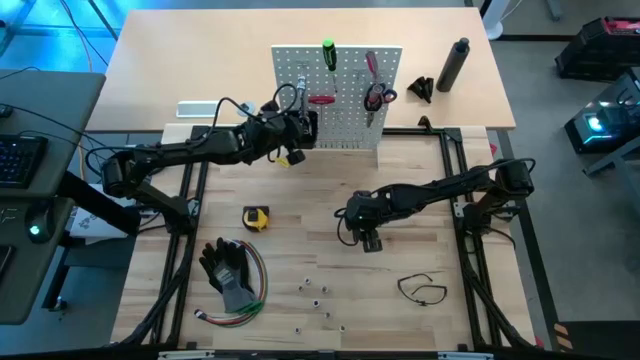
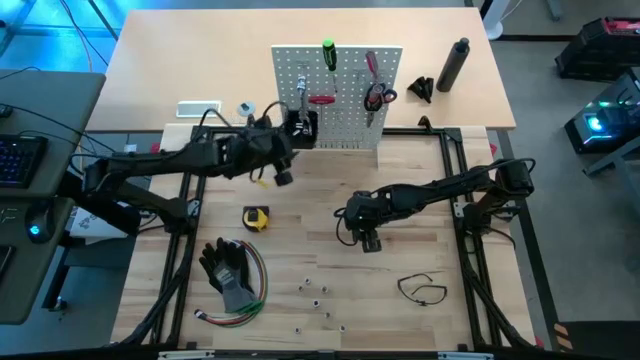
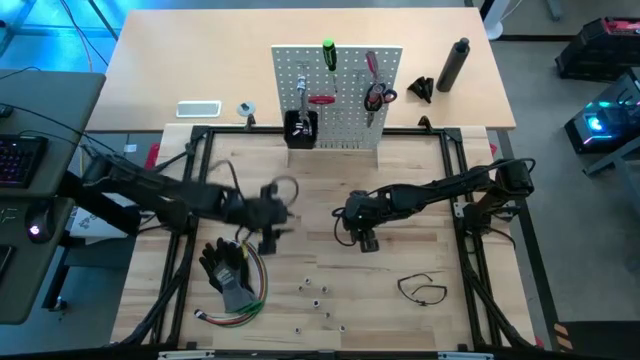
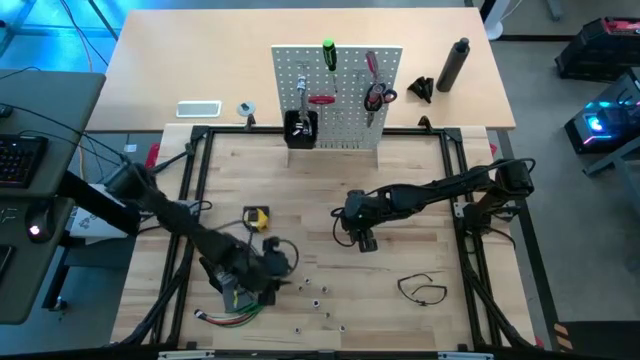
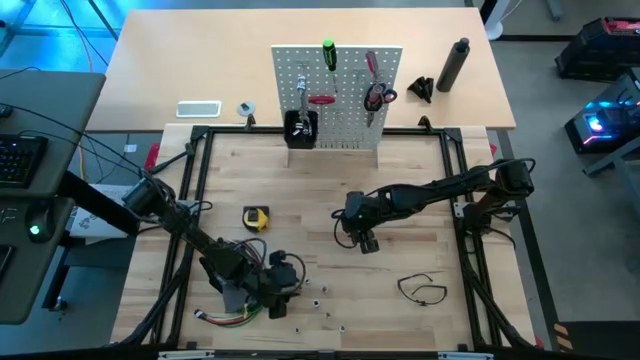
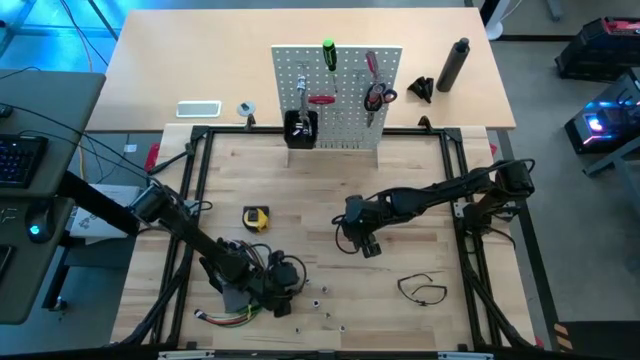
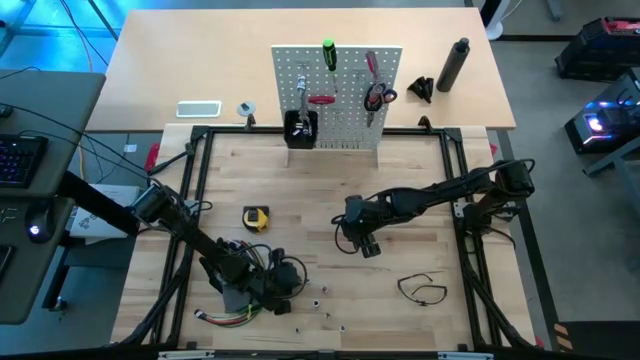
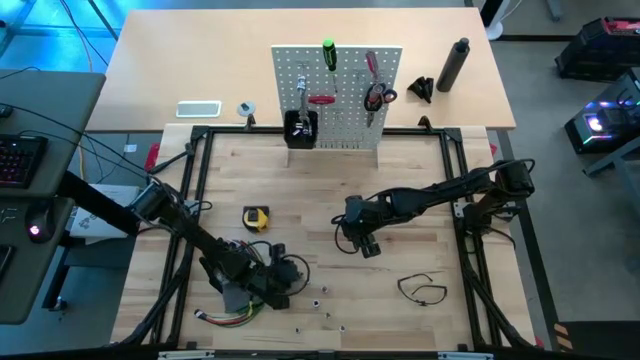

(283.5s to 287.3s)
Task: Hang tools onto peg board
Put the silver socket into the black bin on the white peg board

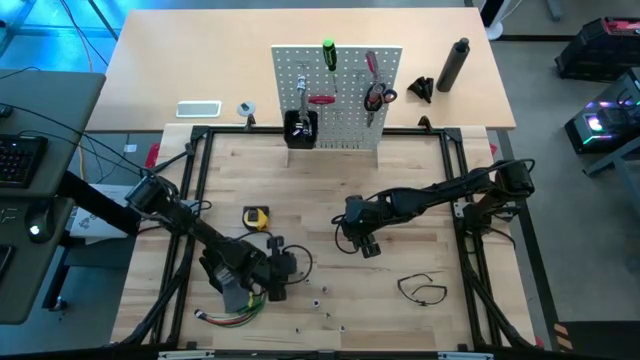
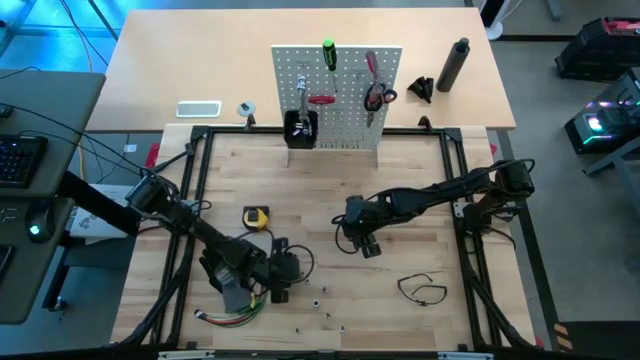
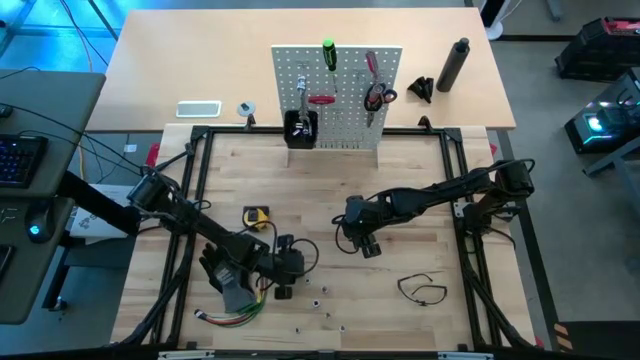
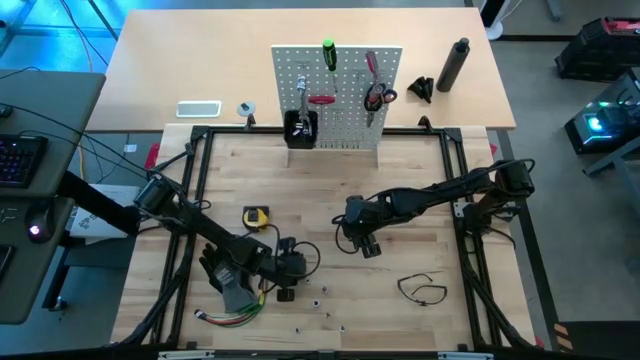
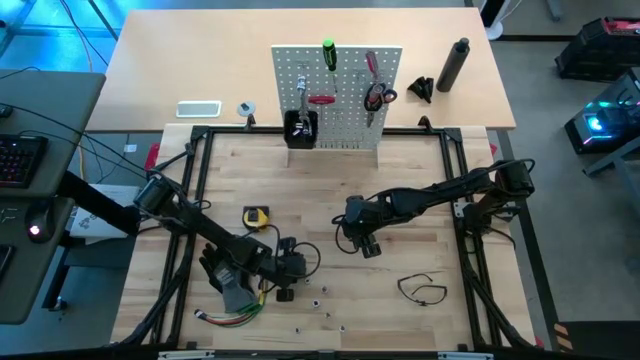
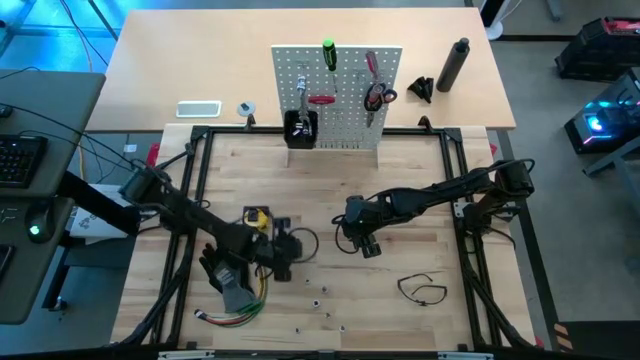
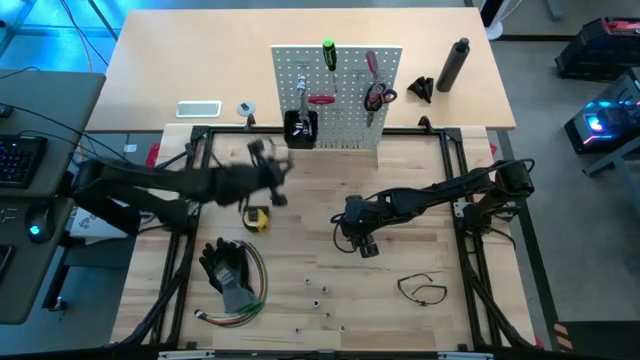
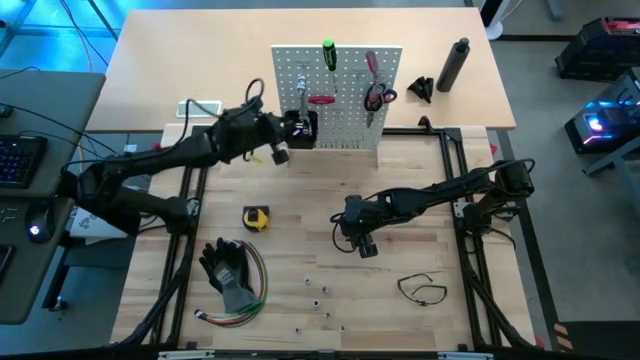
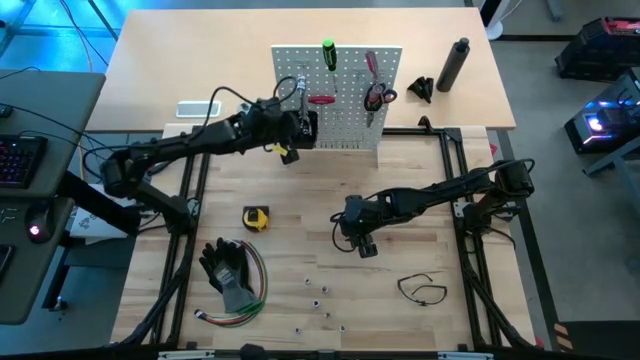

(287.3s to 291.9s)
Put the silver socket into the black bin on the white peg board

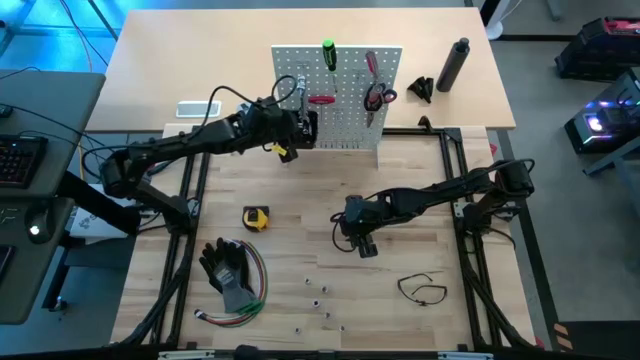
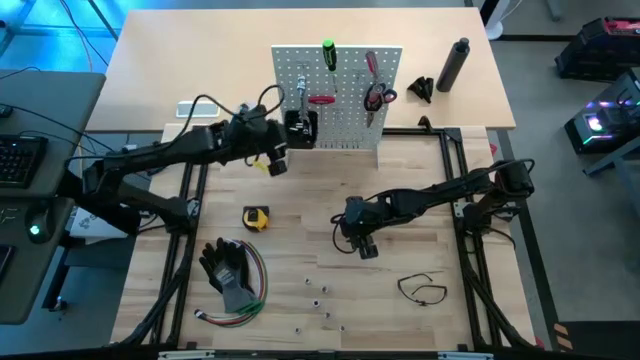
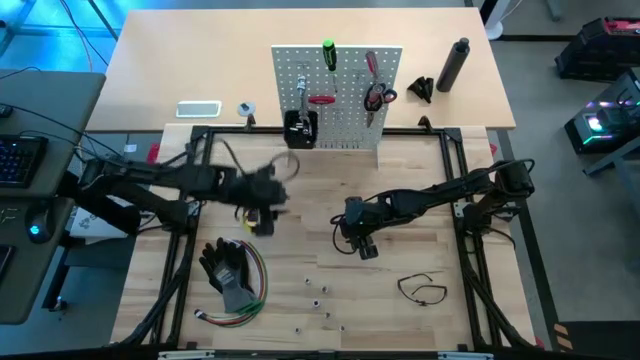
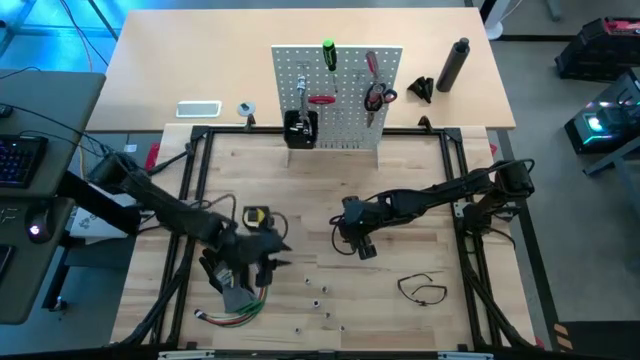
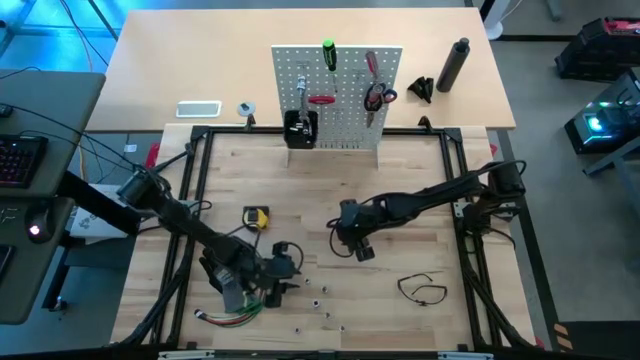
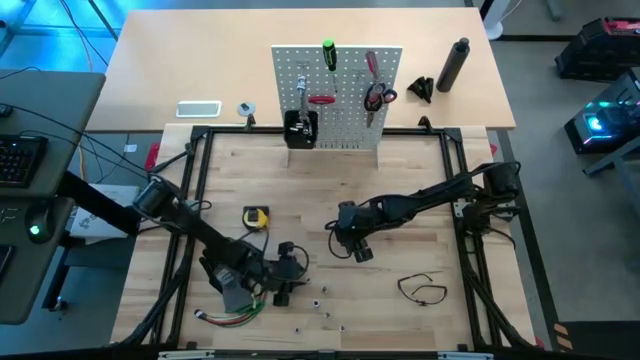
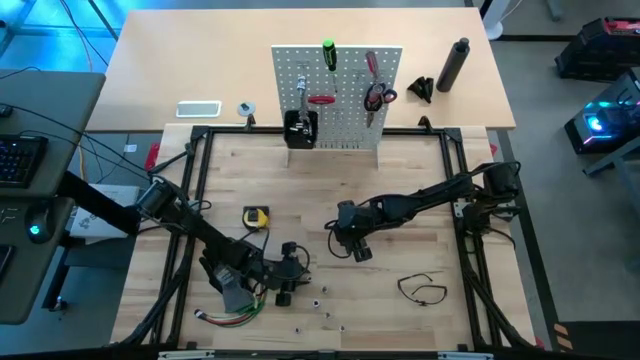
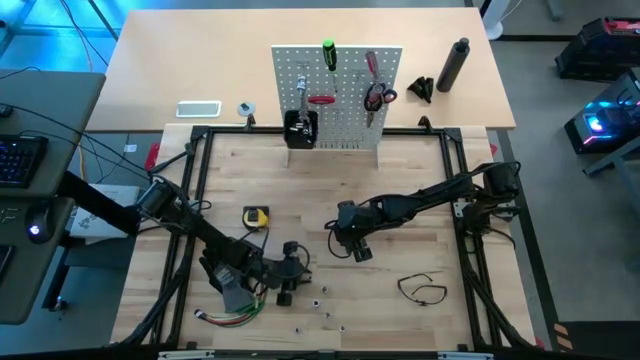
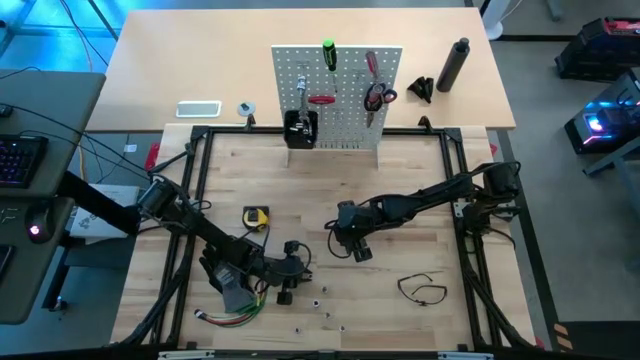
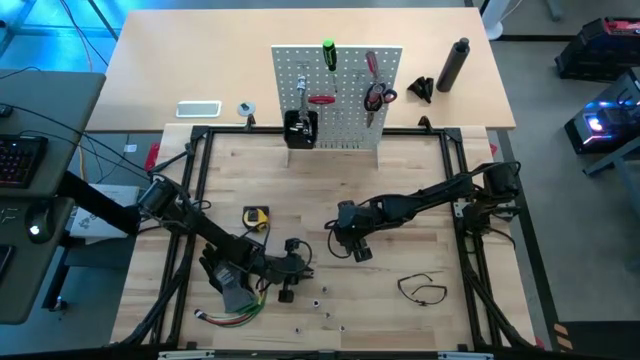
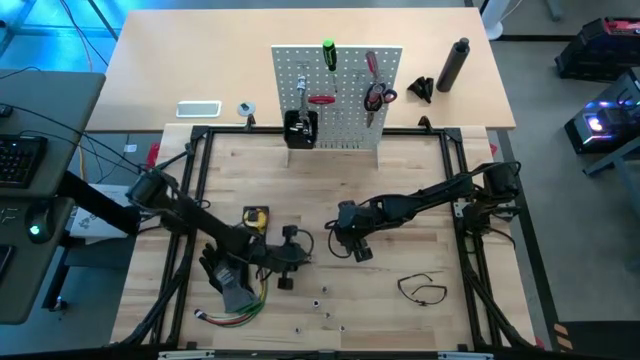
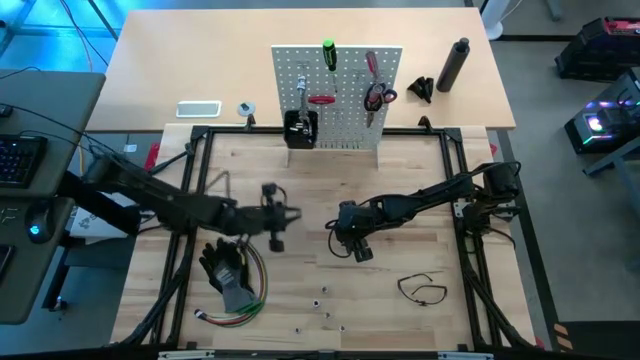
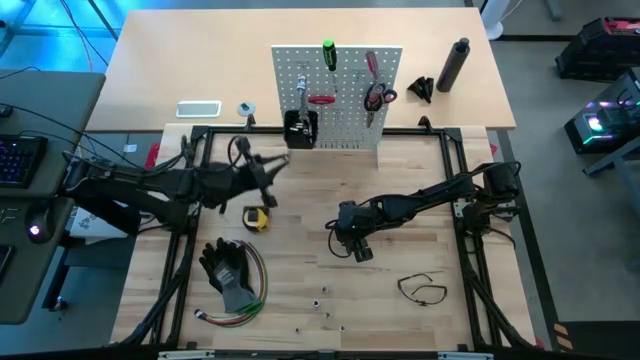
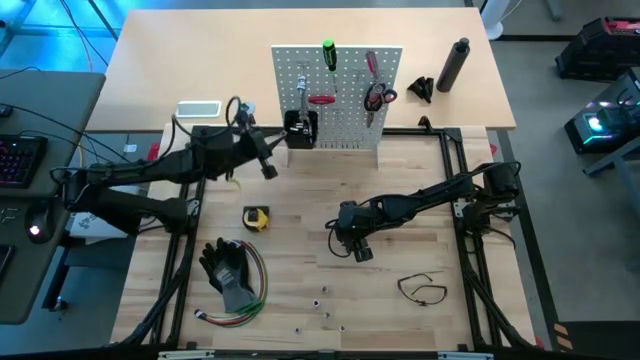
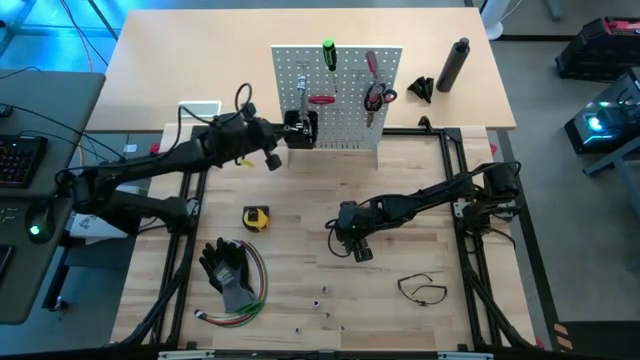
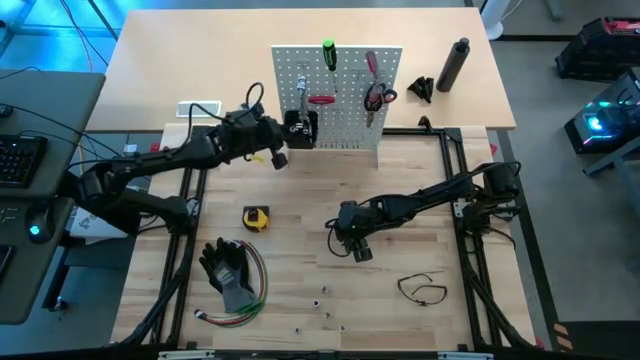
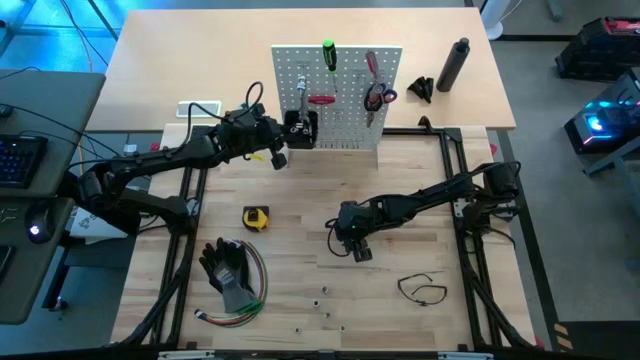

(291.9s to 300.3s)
Put the silver socket into the black bin on the white peg board

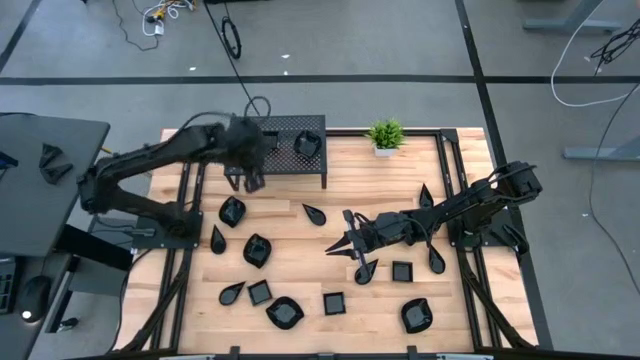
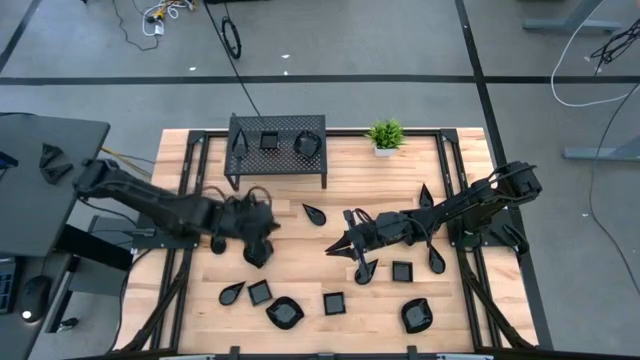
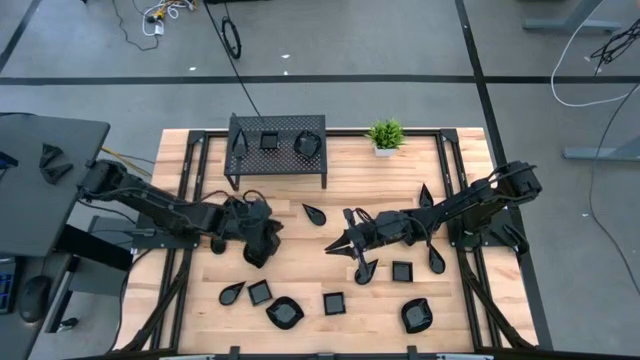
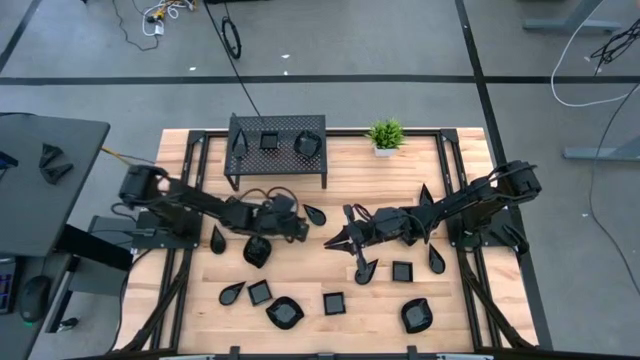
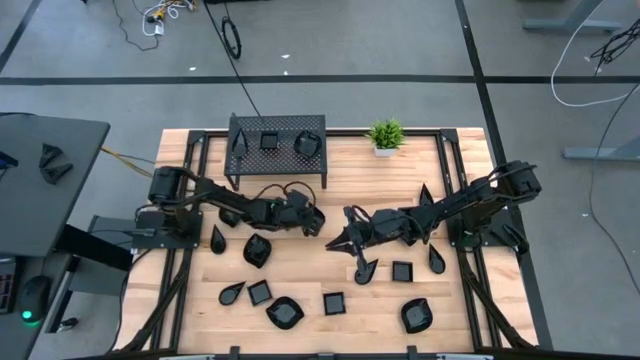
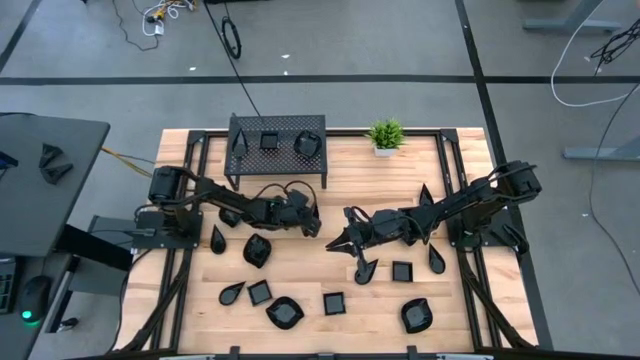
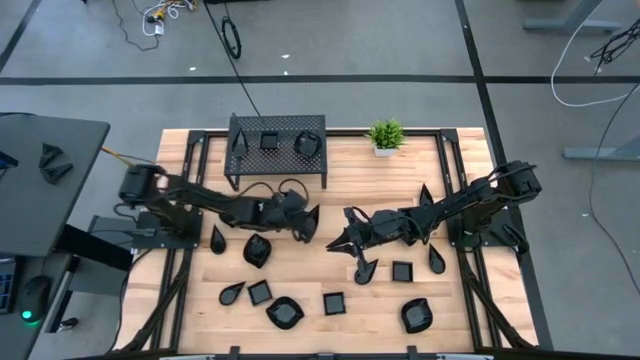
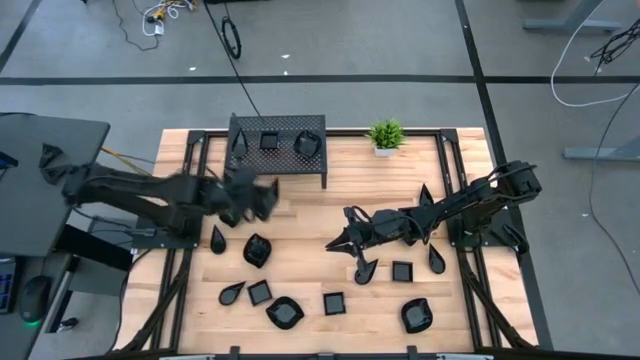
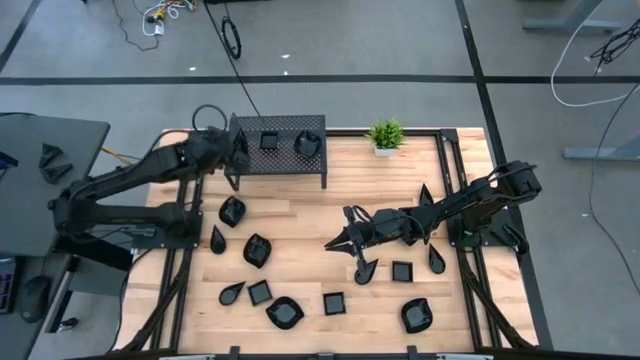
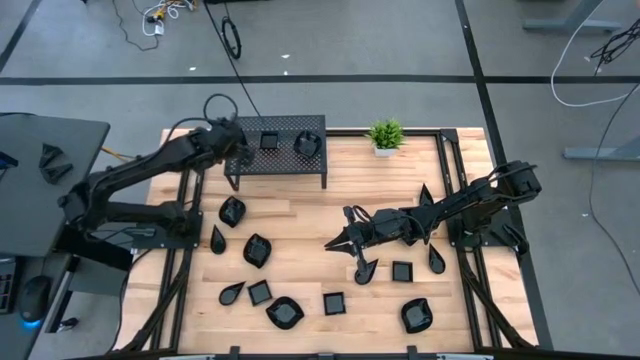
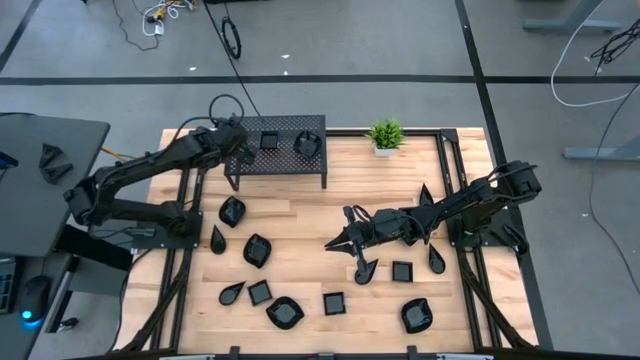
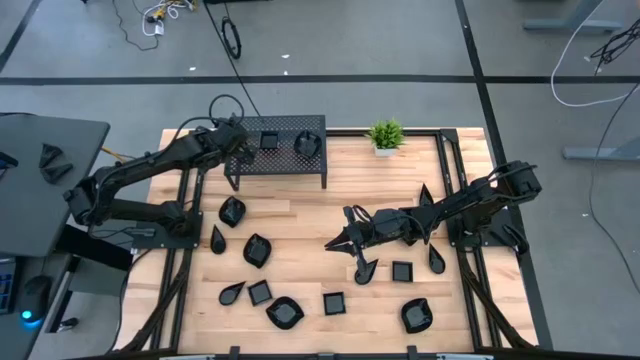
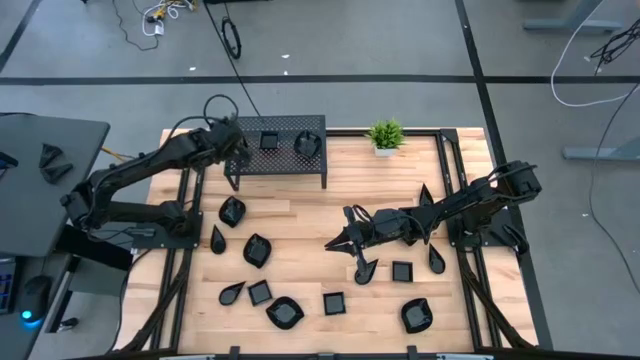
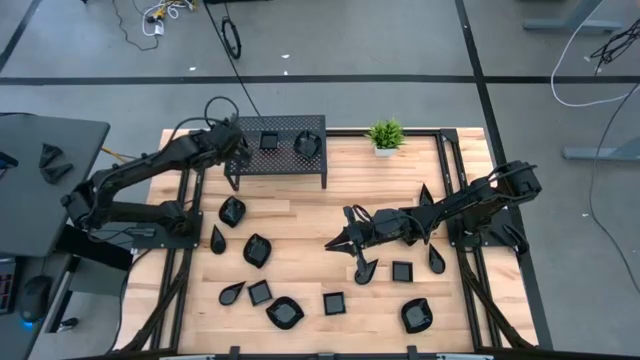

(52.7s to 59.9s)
Task: Pick & Place Mini shaped plates
Stack the black drop shaped plate on top of the black drop shaped plates on the shelf
